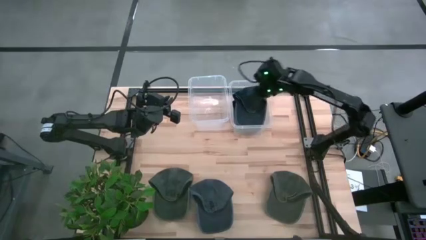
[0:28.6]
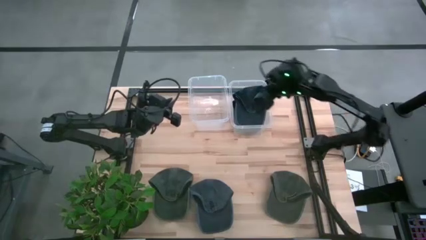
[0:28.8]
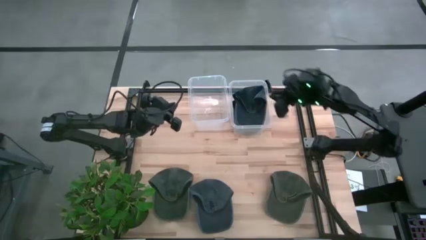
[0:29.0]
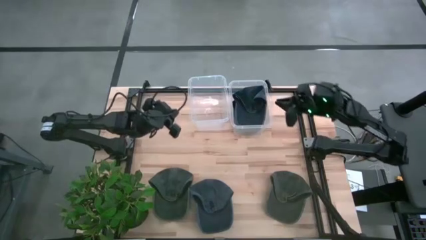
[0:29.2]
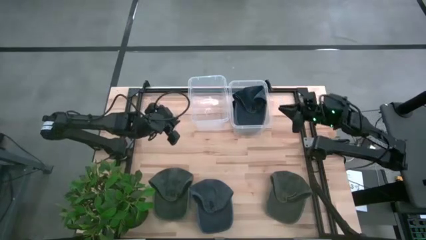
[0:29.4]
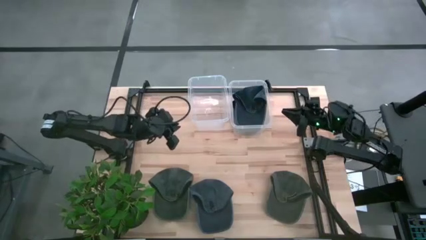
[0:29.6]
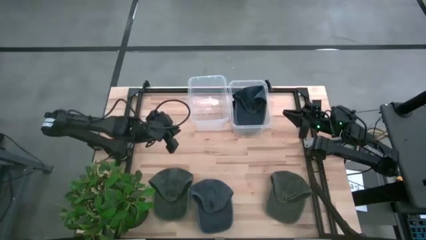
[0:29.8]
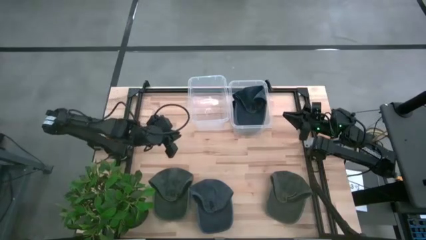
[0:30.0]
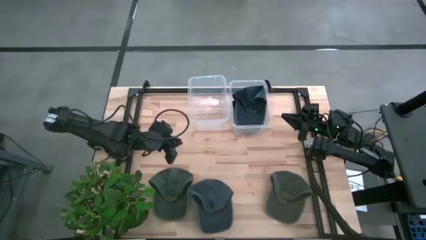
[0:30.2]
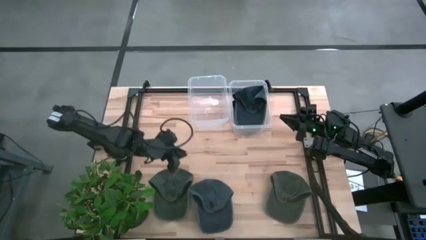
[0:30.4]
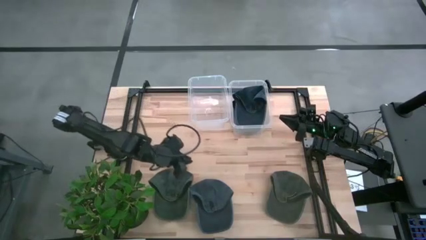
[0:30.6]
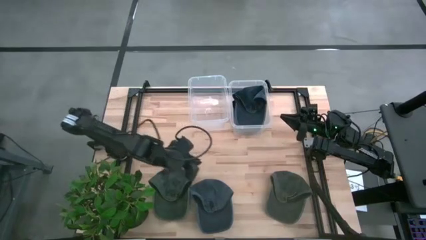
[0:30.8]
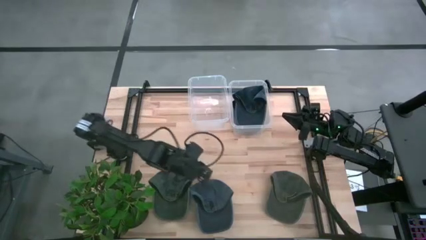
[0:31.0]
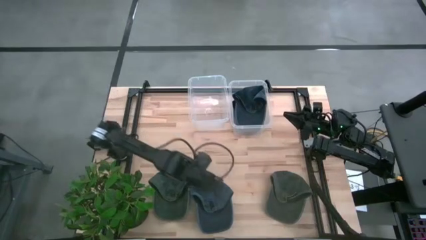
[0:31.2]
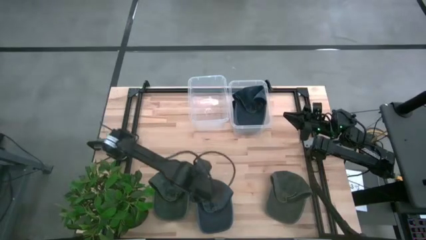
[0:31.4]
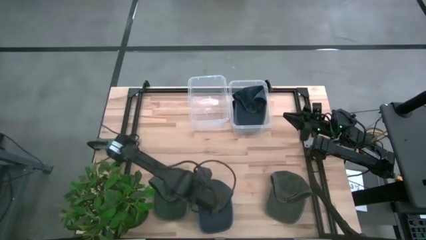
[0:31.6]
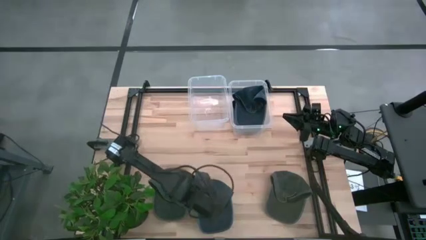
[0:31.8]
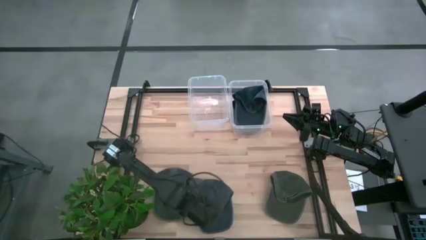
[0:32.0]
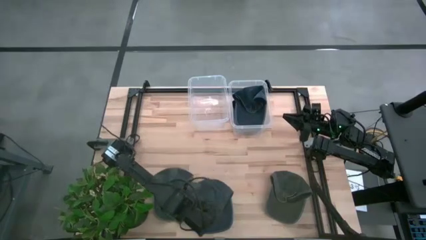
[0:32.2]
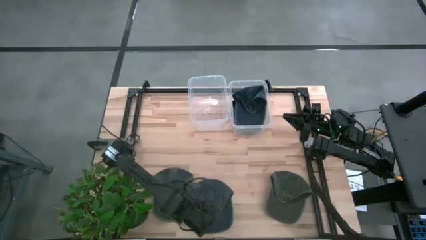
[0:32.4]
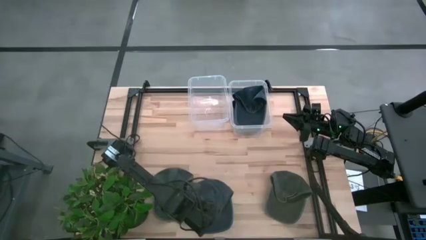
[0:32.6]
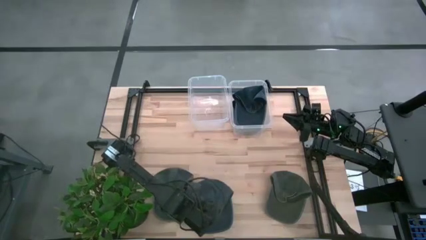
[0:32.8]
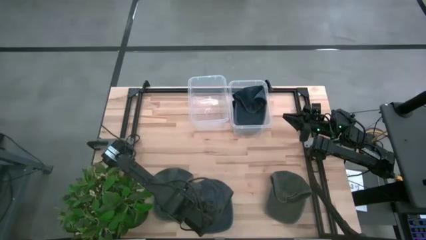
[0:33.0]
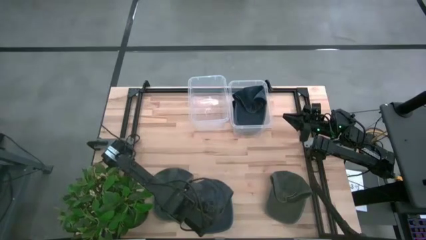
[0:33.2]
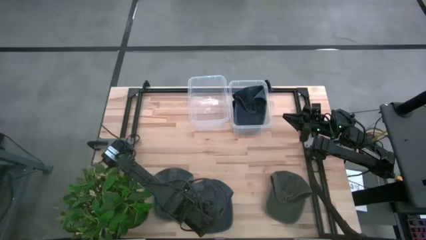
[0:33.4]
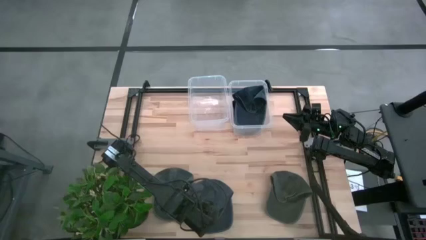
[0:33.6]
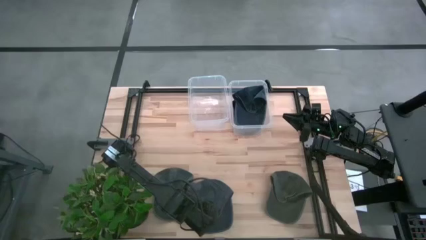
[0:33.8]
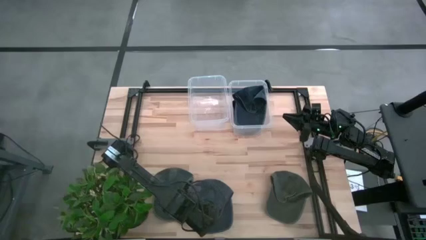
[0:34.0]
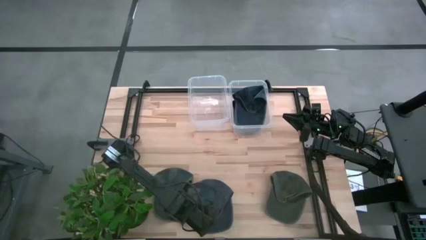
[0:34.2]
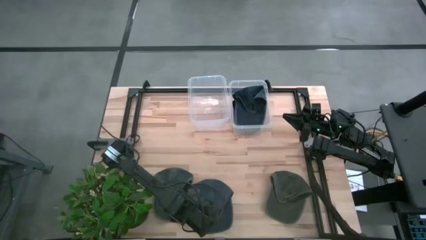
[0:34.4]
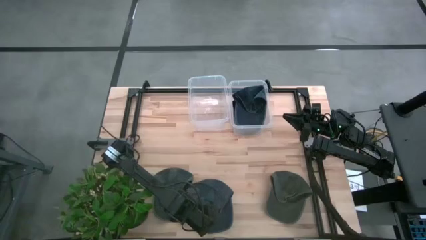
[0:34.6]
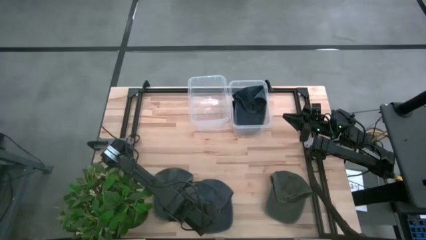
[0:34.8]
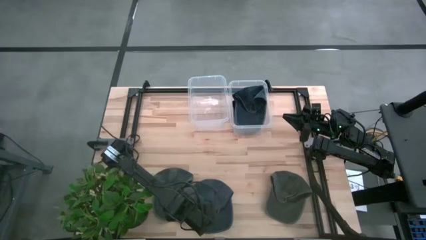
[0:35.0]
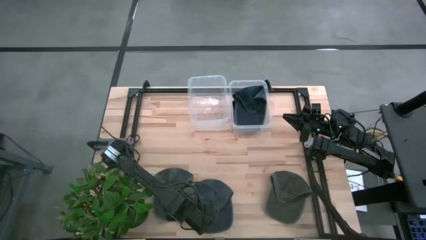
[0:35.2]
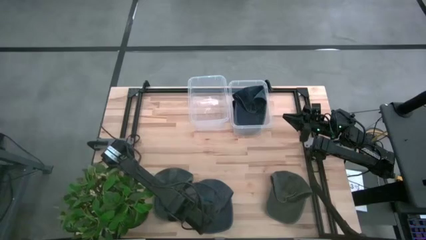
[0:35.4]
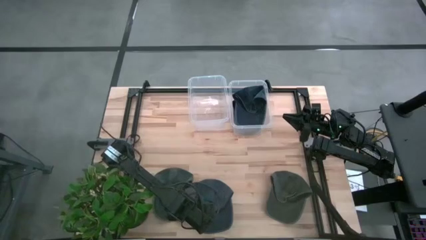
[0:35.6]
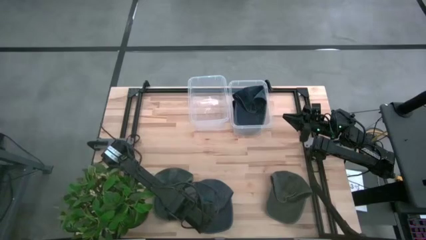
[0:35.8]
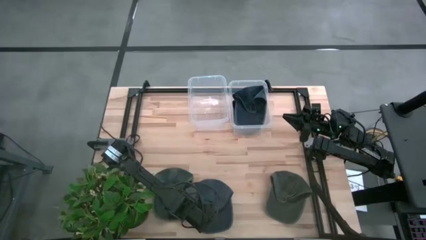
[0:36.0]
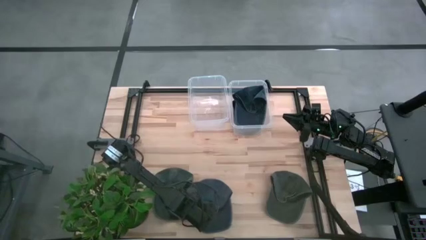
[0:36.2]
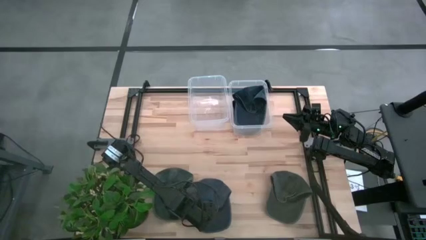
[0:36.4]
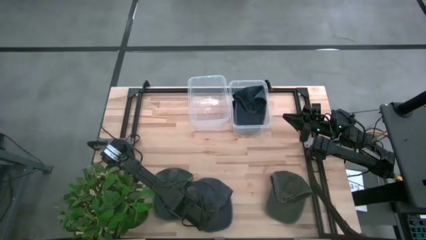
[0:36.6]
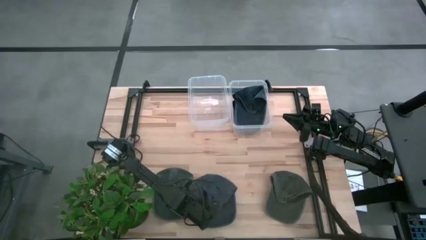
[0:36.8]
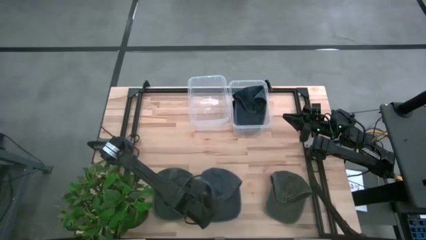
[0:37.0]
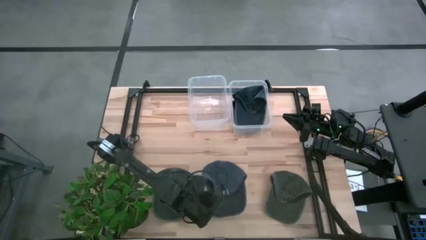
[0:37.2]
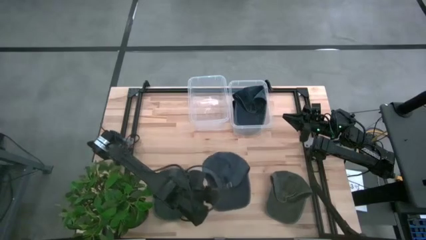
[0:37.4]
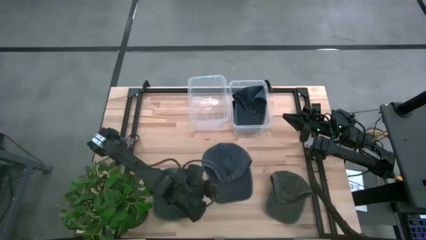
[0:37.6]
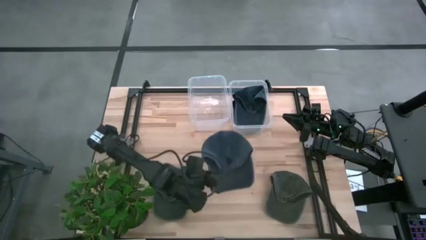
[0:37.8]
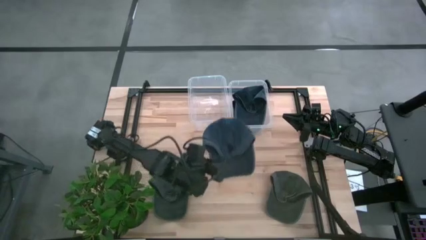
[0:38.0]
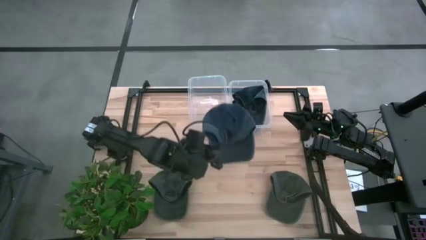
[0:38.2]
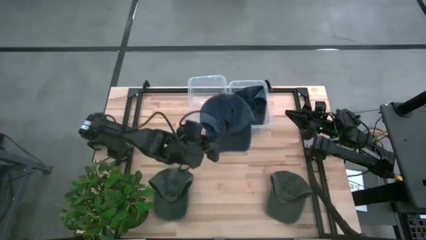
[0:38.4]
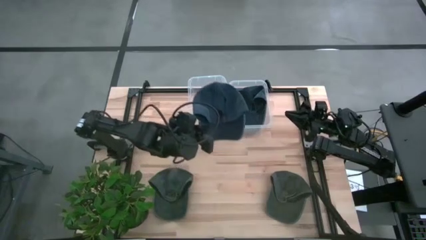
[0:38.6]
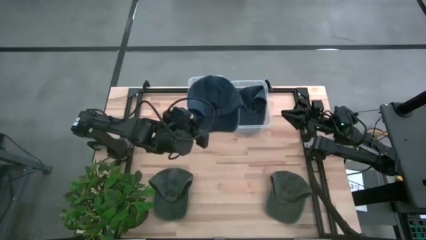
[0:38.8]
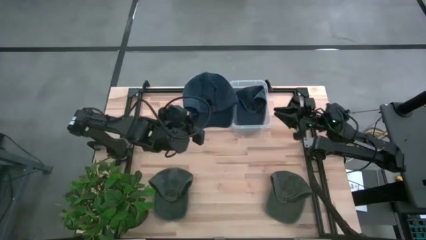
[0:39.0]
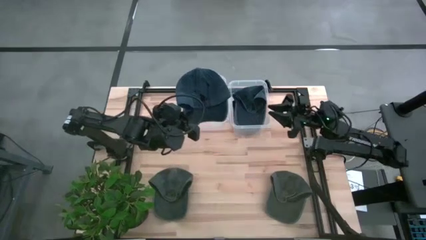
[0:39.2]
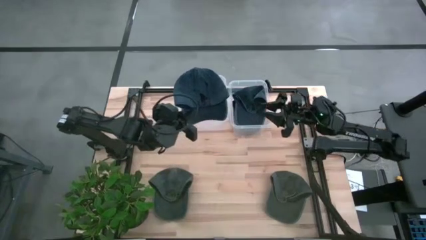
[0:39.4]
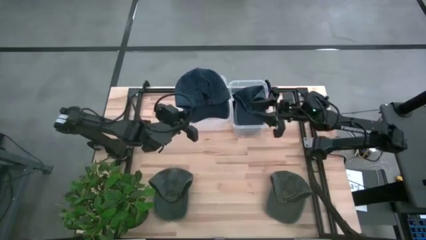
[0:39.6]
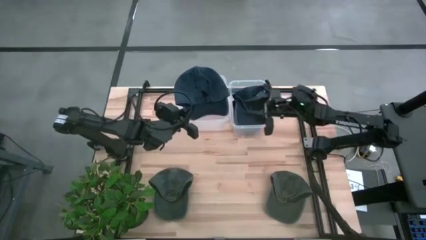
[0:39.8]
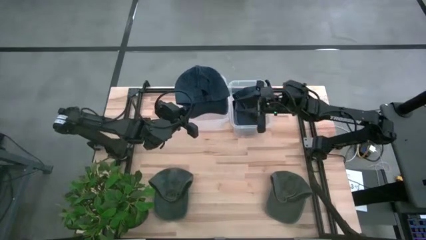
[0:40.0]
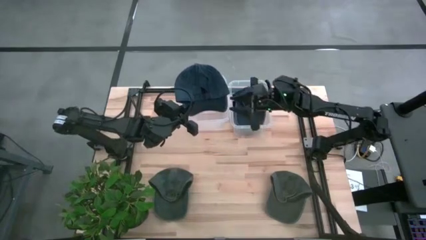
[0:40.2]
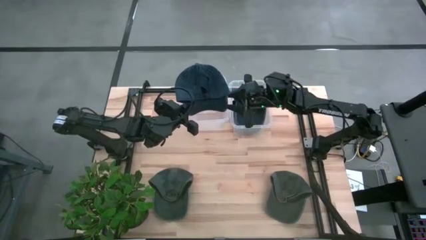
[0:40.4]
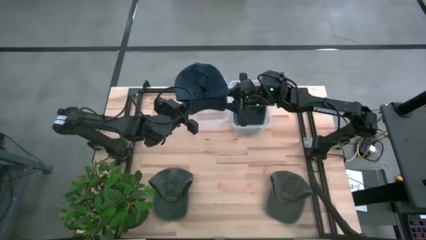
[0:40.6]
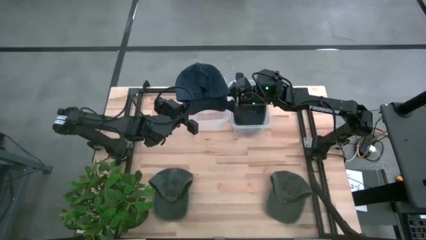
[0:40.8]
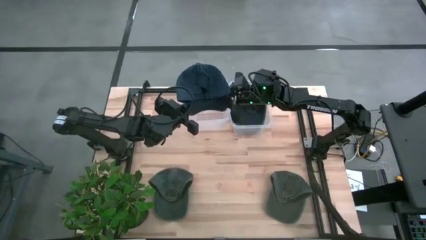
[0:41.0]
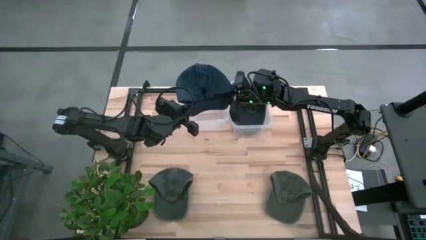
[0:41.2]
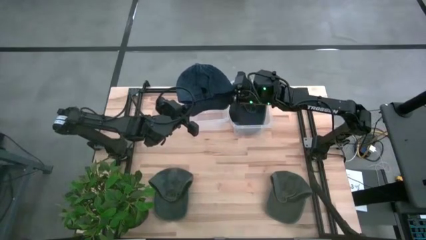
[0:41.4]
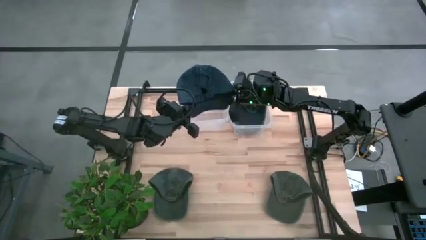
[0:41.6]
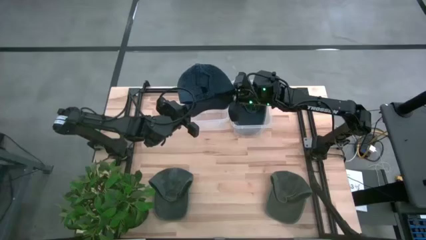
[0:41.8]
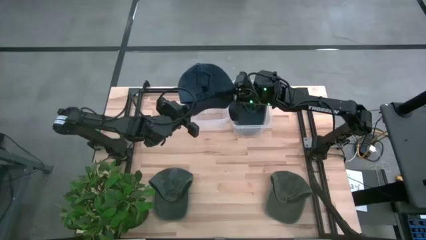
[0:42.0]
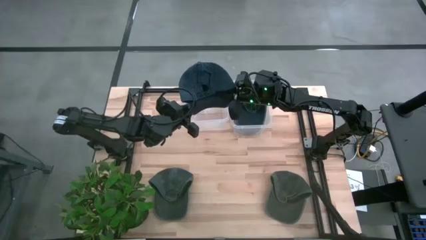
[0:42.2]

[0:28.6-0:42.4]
Task: Pick & Place hat
Put the blue cap into the right transparent bin
